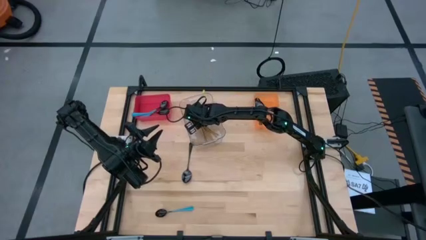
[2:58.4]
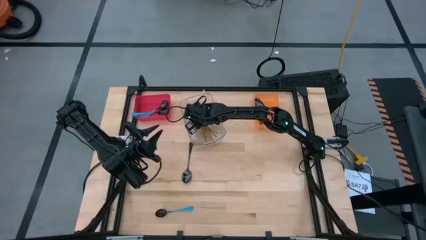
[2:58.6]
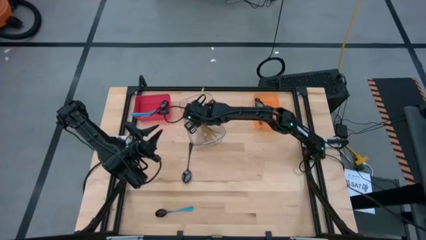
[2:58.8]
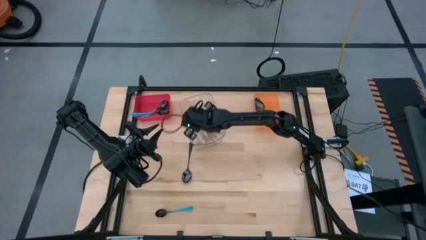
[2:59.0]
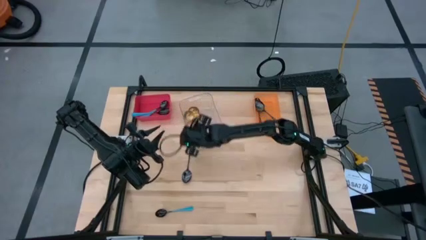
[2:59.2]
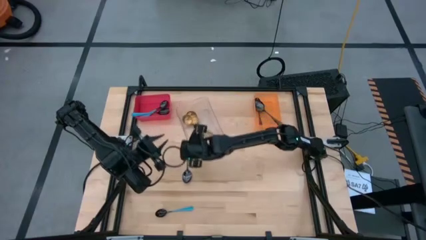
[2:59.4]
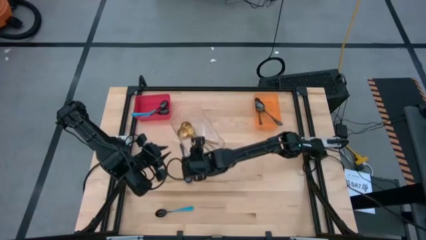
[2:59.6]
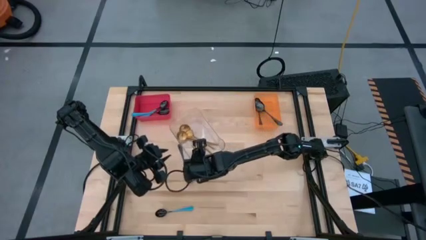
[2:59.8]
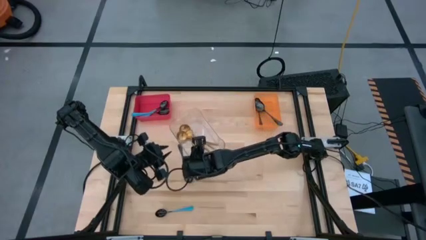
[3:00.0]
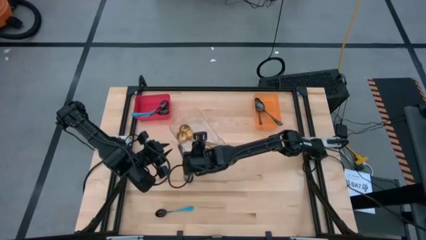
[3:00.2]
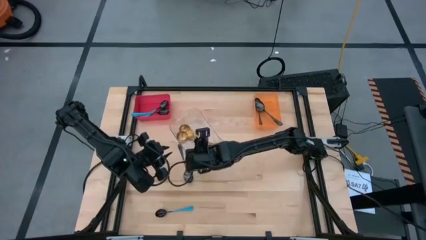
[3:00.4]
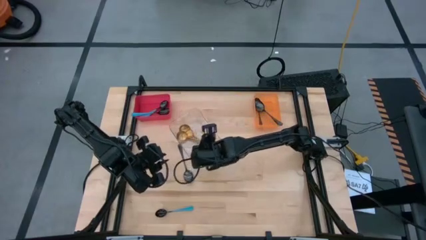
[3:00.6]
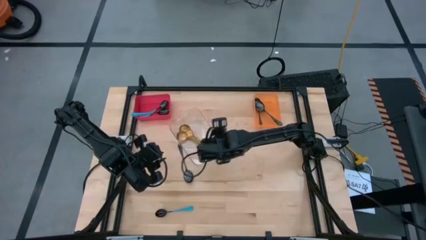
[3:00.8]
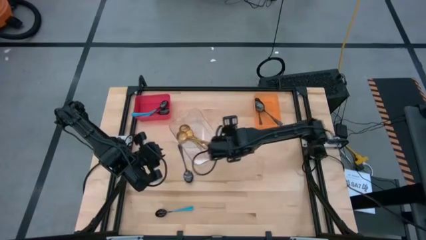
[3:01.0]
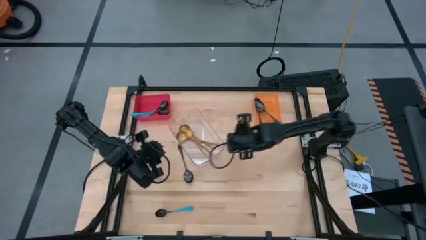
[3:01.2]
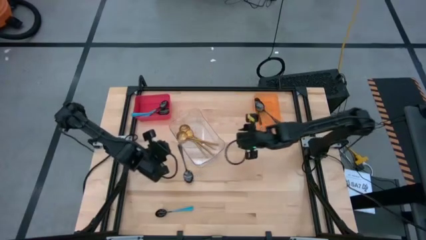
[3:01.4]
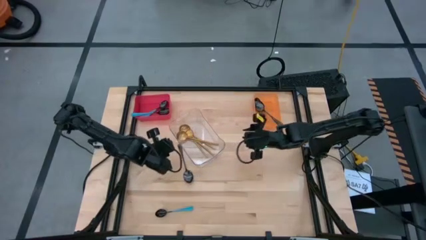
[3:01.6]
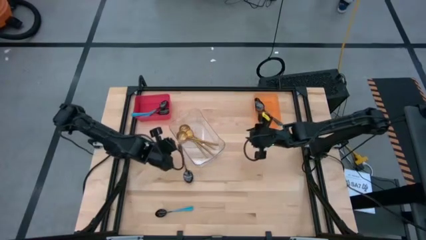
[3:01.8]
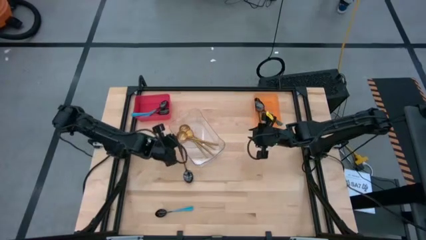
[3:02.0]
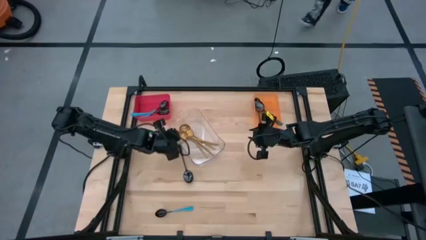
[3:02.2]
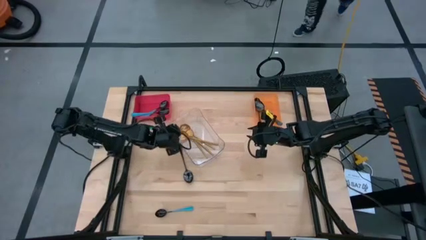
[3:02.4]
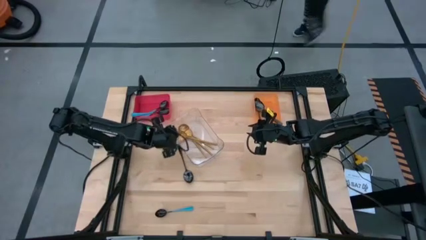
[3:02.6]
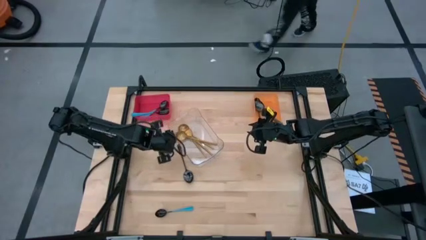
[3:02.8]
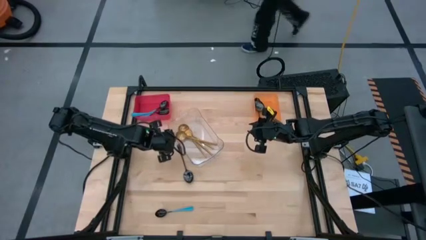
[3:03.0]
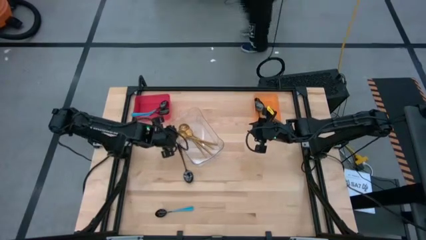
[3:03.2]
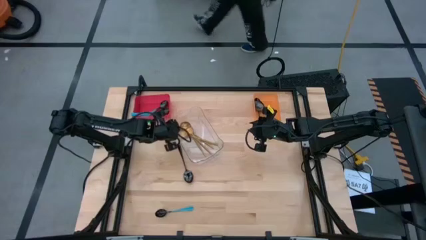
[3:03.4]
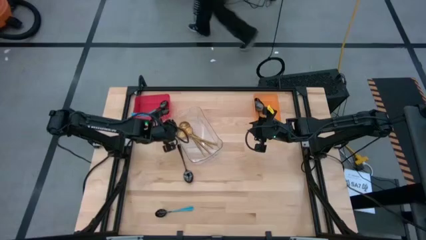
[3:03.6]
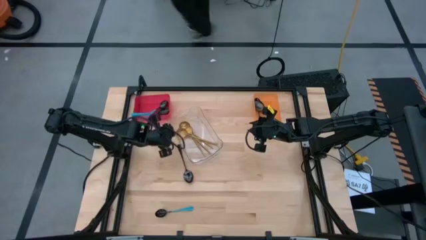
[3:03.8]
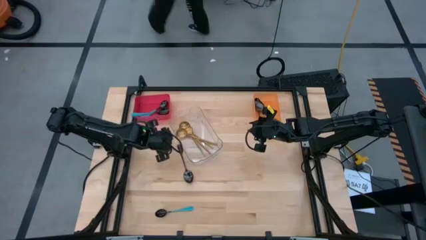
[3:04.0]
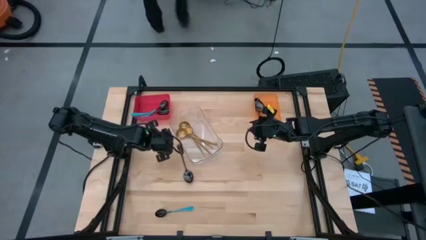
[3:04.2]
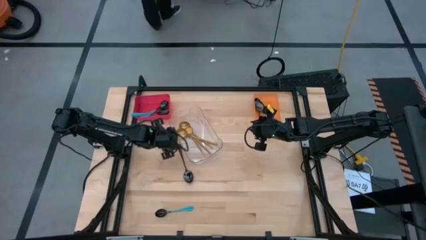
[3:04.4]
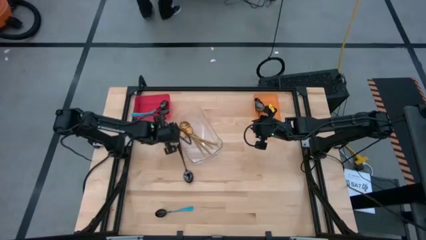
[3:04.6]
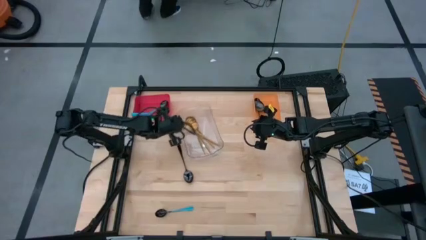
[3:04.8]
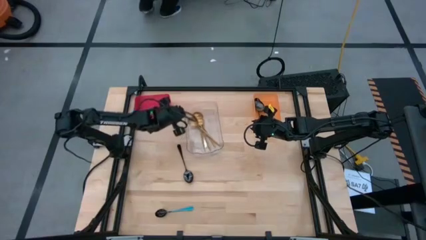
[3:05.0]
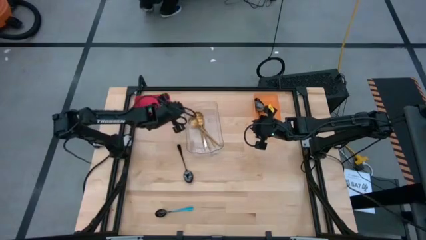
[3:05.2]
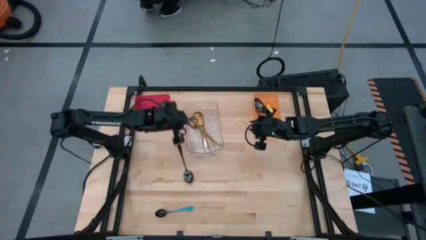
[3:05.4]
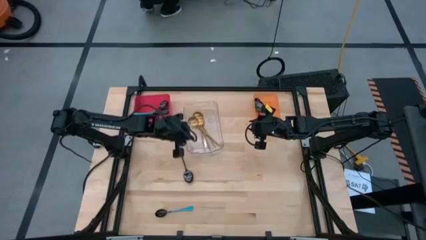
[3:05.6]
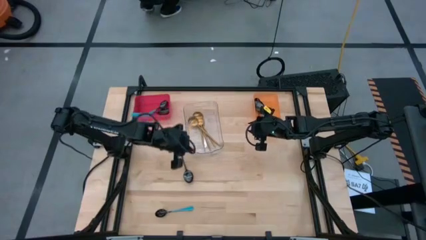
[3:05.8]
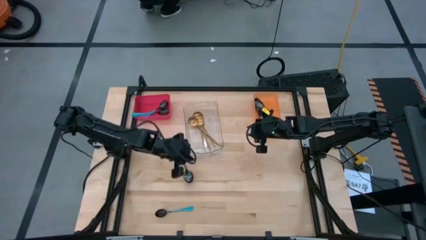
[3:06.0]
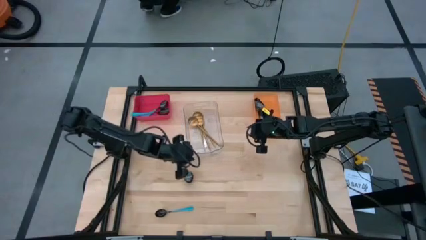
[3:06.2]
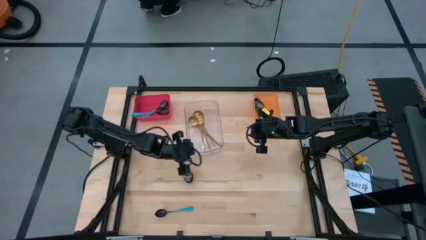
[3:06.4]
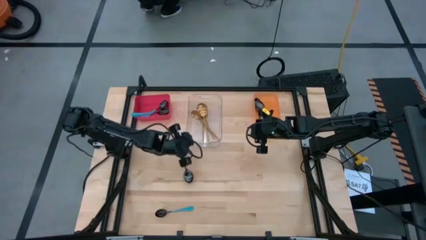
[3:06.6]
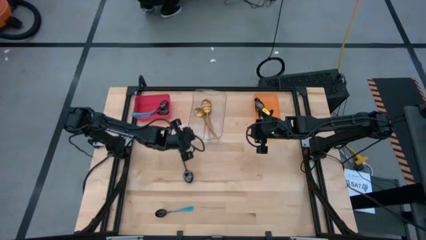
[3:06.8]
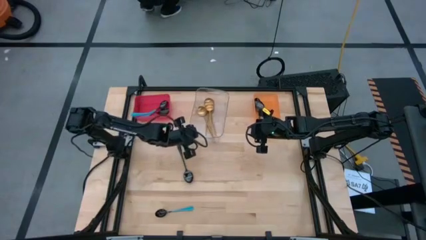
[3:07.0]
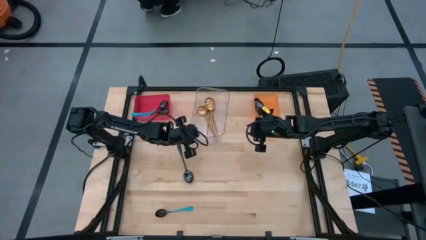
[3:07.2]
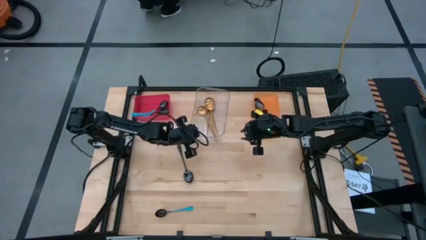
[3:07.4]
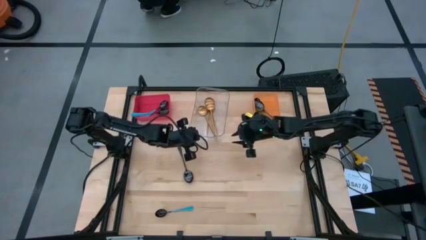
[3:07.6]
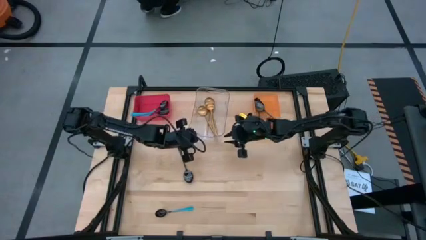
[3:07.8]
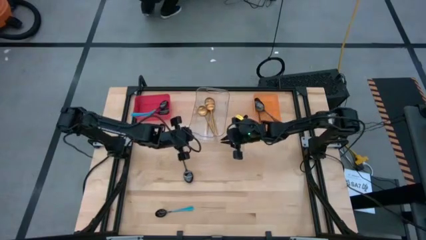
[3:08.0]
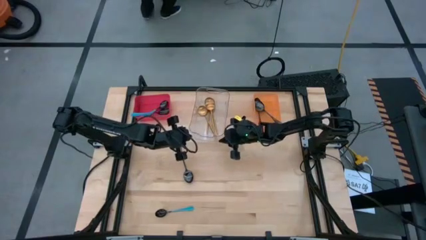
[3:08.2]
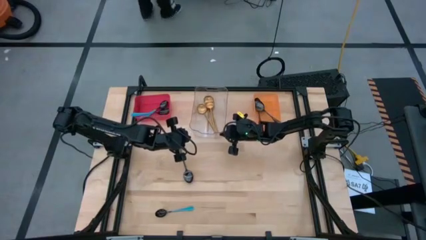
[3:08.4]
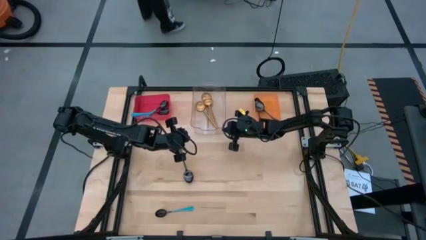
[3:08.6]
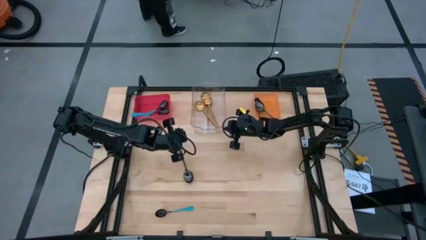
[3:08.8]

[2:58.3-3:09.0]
Task: Sort silverware by color (type)
Adjust the transparent bin

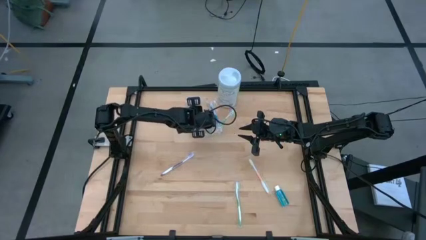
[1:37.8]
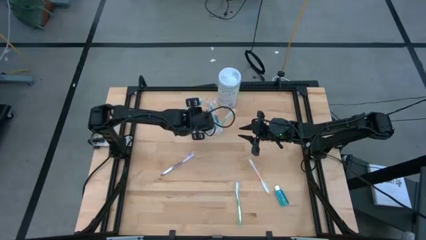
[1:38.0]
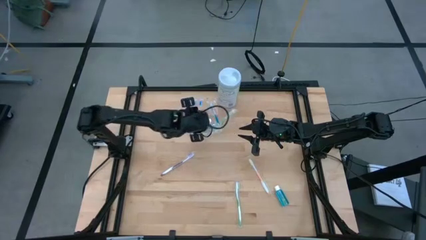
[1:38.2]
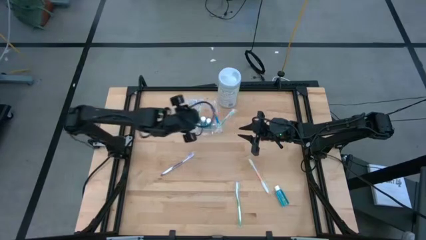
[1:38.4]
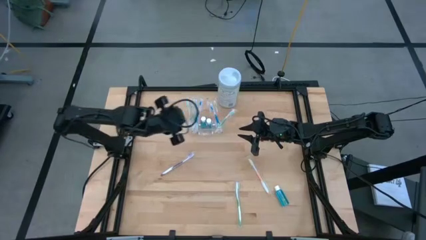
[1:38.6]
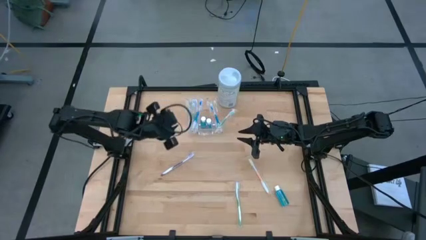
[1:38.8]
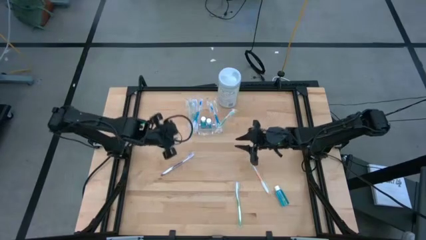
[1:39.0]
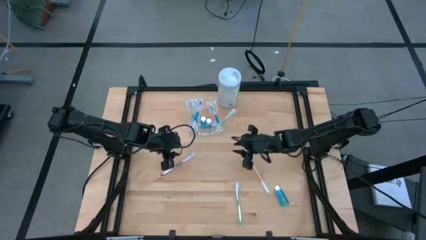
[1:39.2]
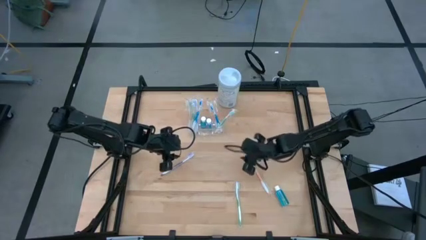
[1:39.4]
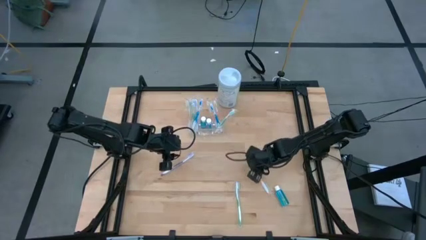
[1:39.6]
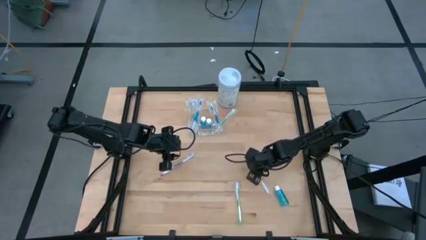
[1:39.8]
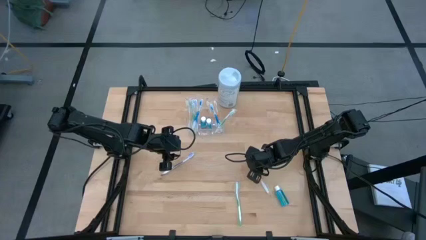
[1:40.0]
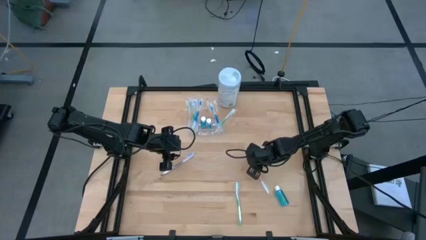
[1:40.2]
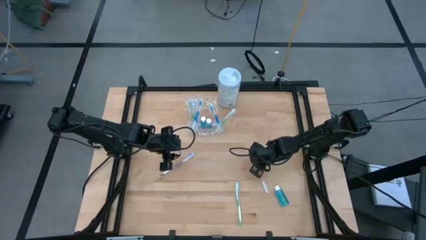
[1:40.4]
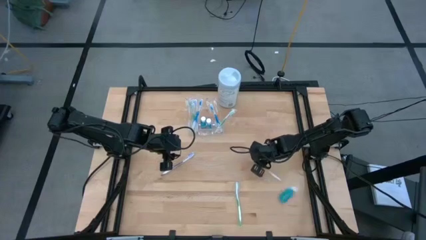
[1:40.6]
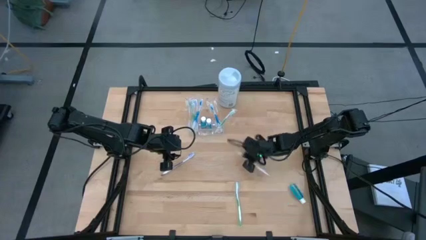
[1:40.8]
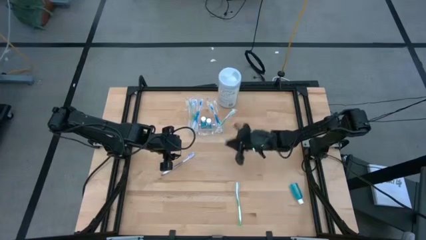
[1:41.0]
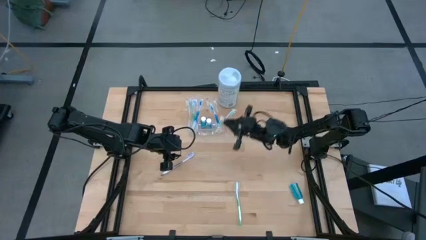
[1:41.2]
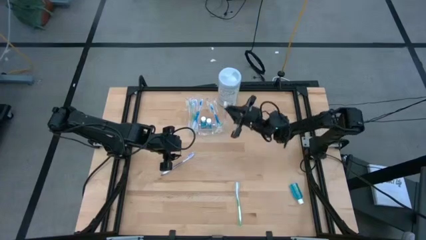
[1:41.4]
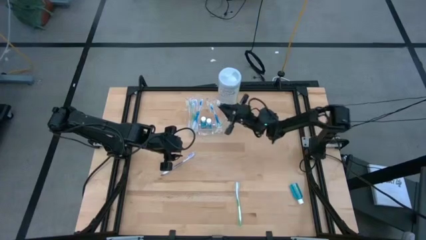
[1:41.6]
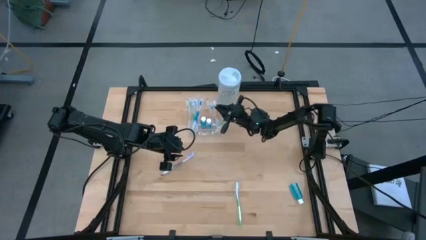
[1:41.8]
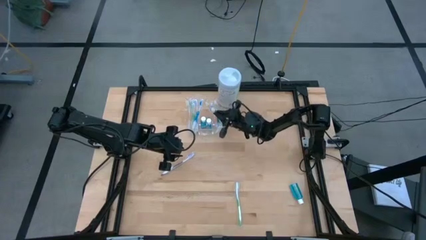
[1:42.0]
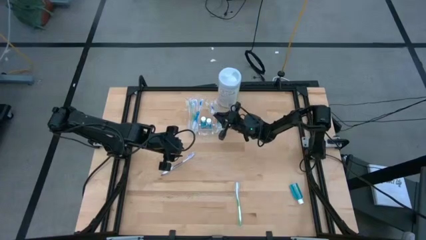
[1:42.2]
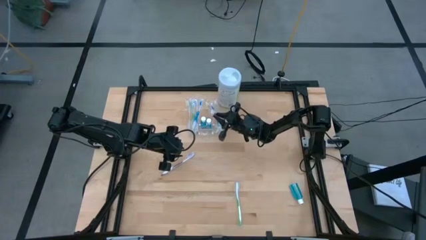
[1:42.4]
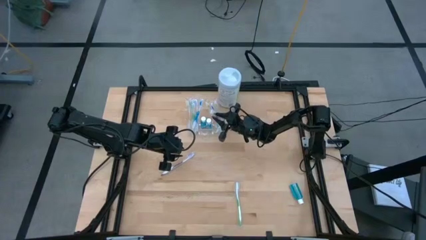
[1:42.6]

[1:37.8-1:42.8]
Task: Pick & Place toothbrushing station
Put the orange toothbrush into the transparent organizer
